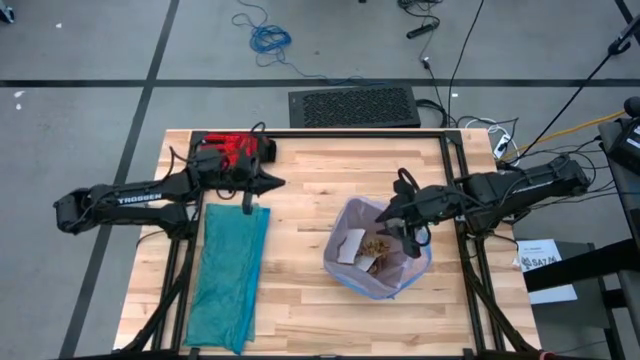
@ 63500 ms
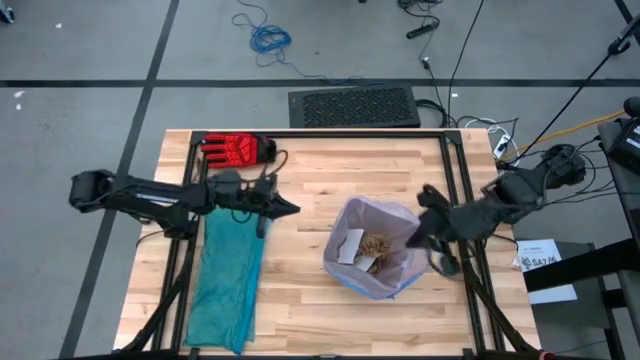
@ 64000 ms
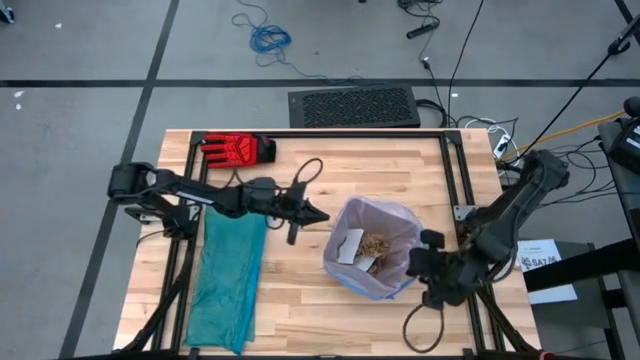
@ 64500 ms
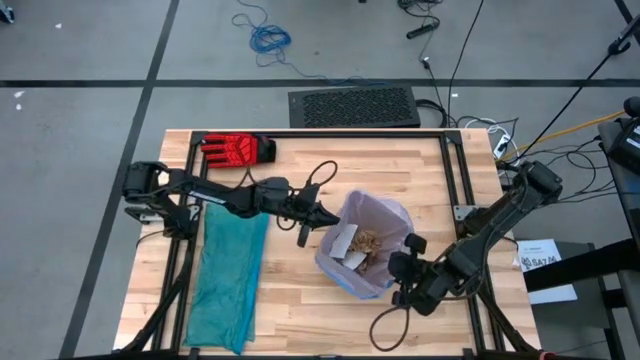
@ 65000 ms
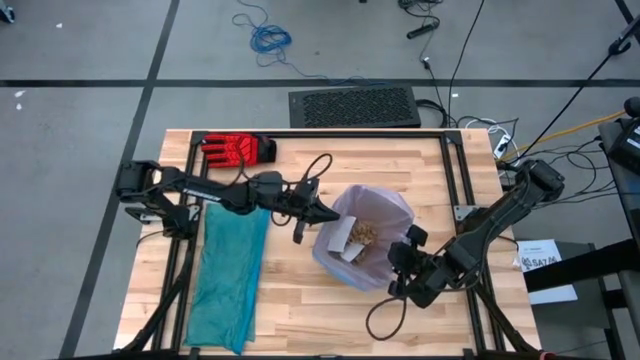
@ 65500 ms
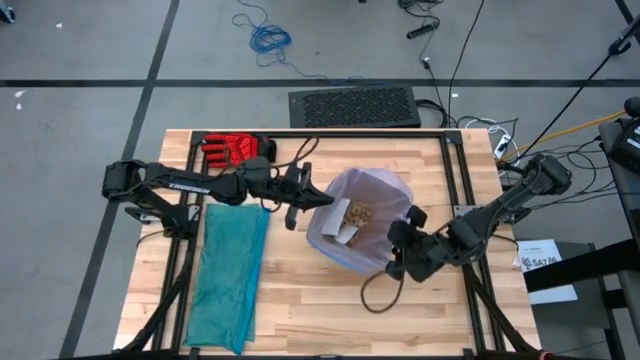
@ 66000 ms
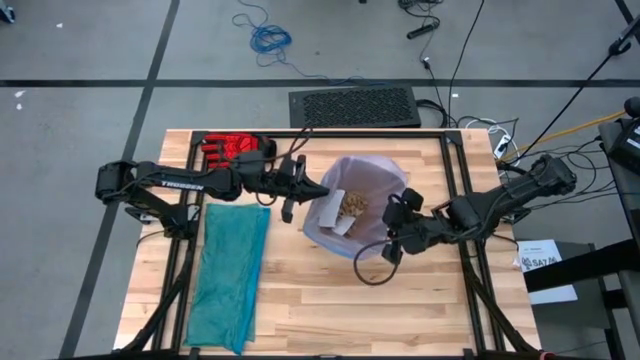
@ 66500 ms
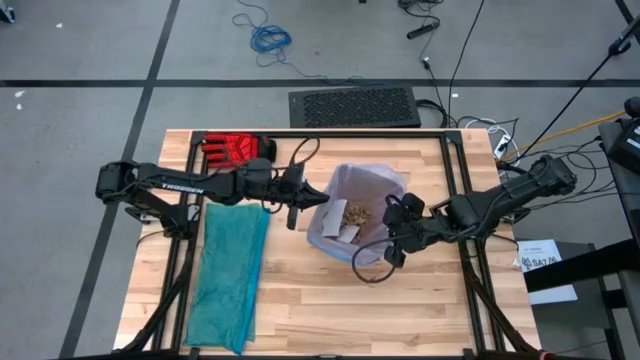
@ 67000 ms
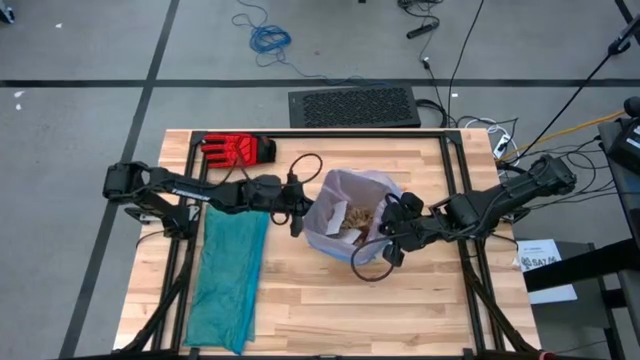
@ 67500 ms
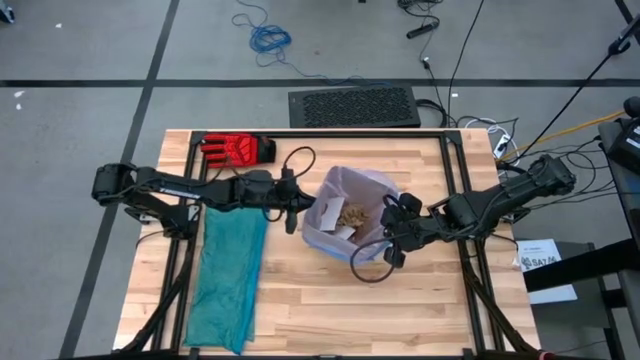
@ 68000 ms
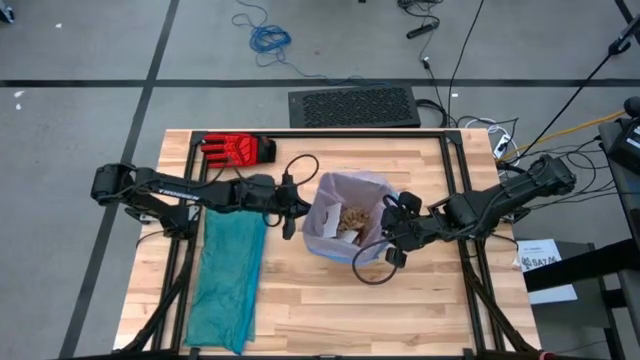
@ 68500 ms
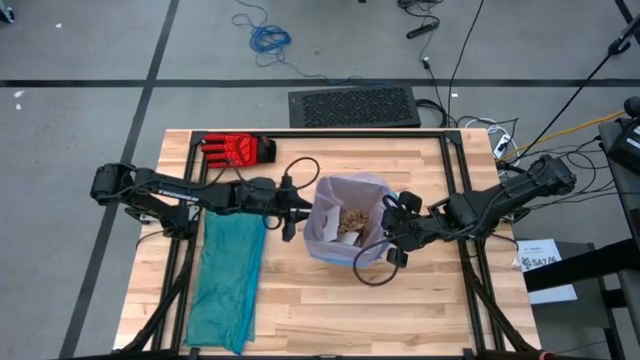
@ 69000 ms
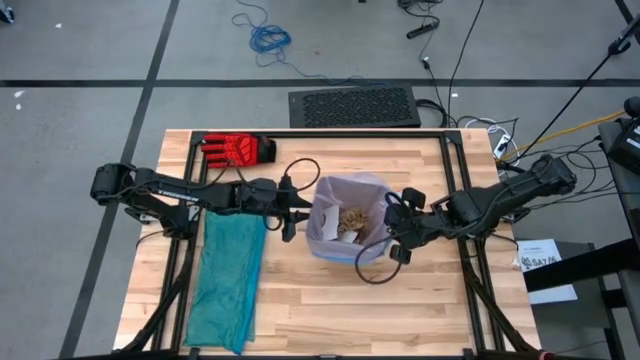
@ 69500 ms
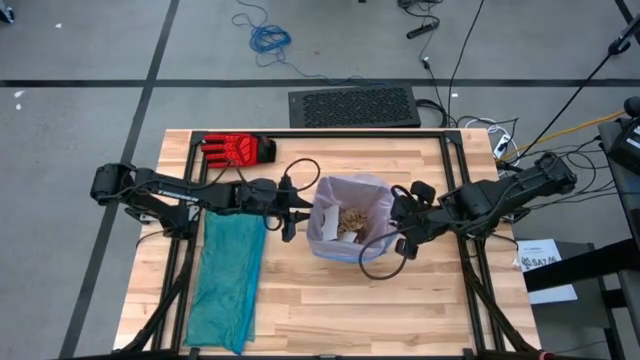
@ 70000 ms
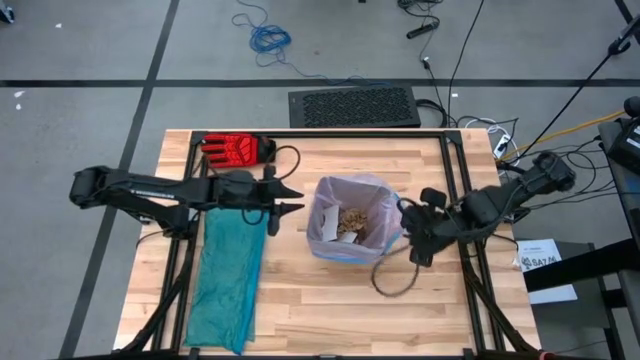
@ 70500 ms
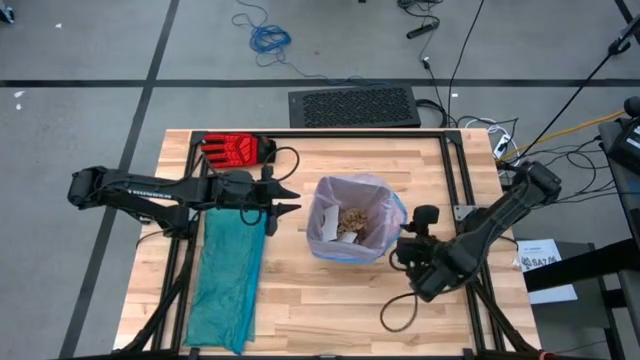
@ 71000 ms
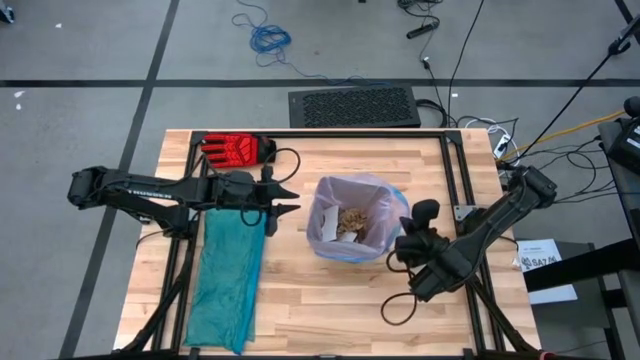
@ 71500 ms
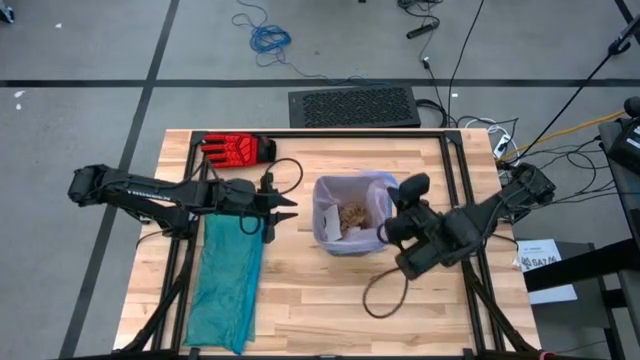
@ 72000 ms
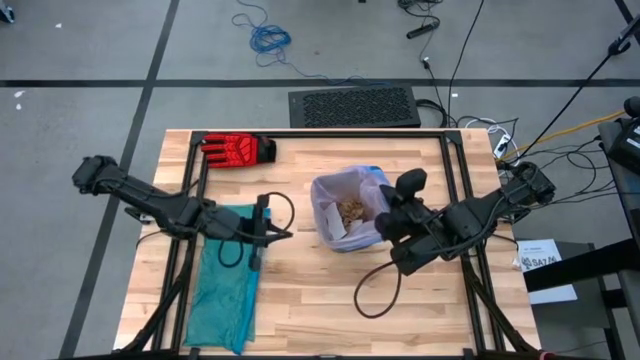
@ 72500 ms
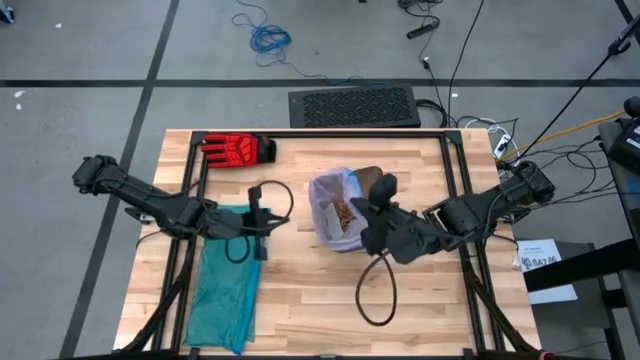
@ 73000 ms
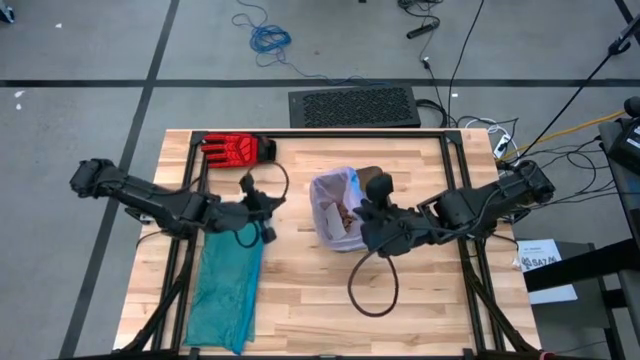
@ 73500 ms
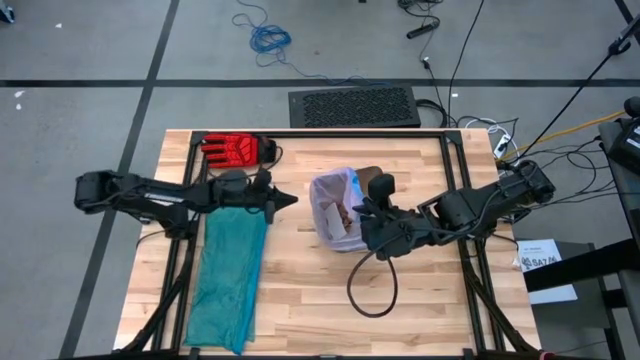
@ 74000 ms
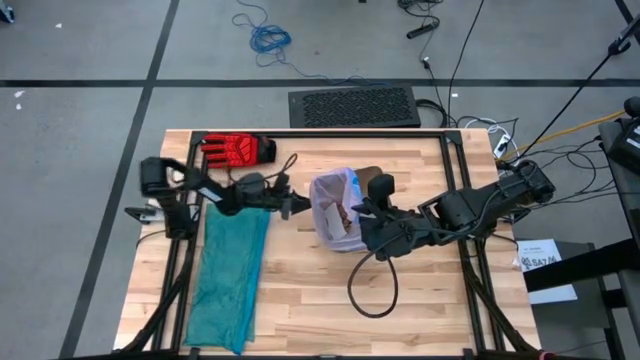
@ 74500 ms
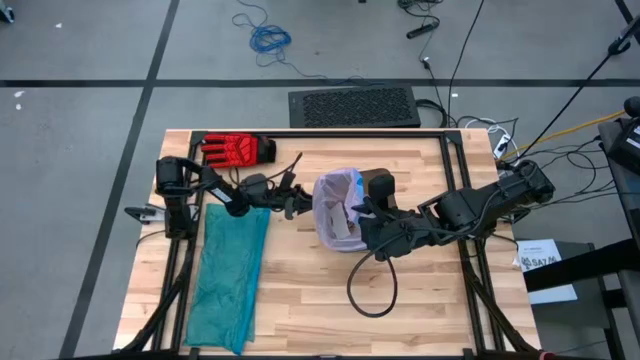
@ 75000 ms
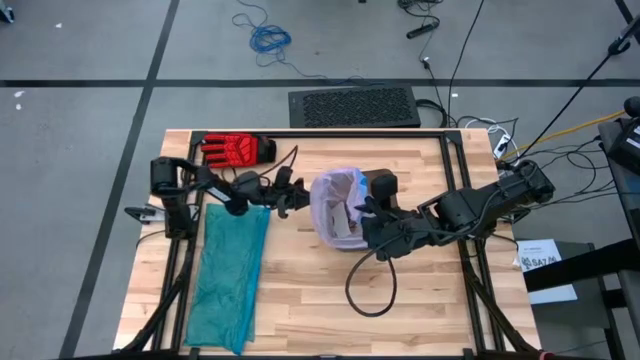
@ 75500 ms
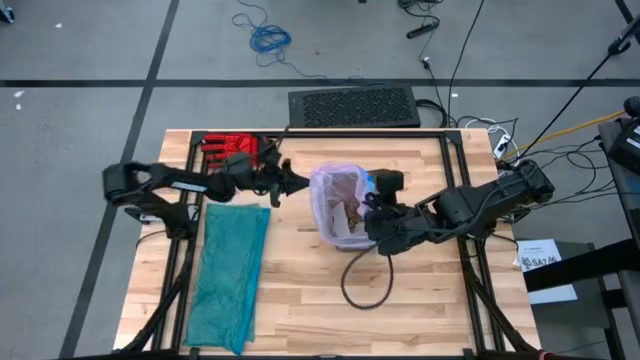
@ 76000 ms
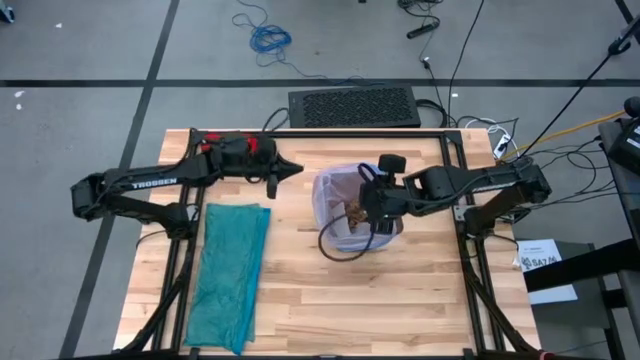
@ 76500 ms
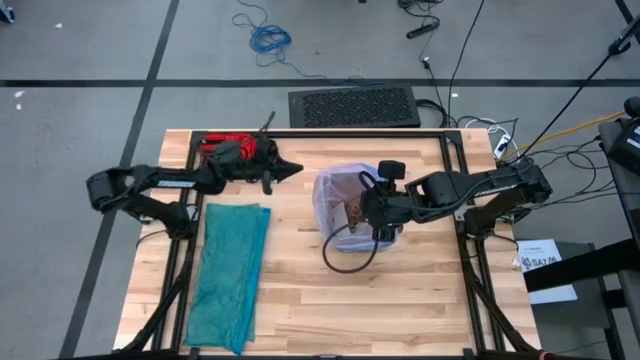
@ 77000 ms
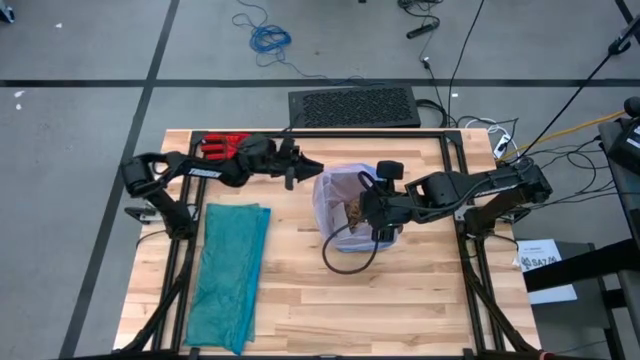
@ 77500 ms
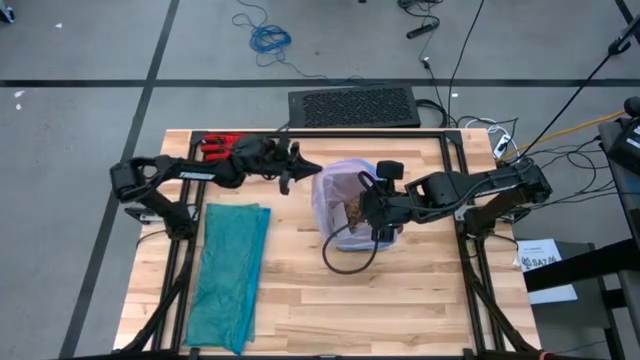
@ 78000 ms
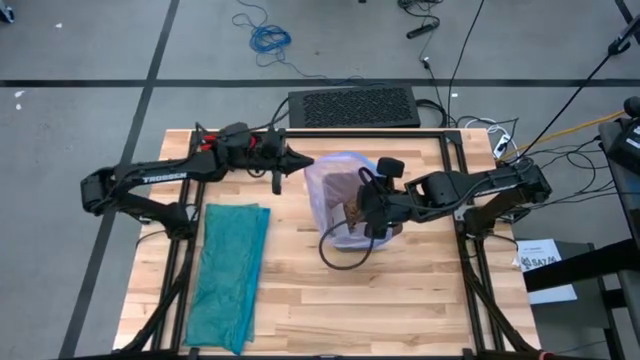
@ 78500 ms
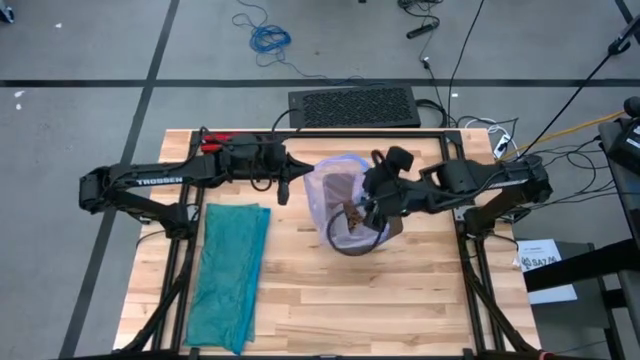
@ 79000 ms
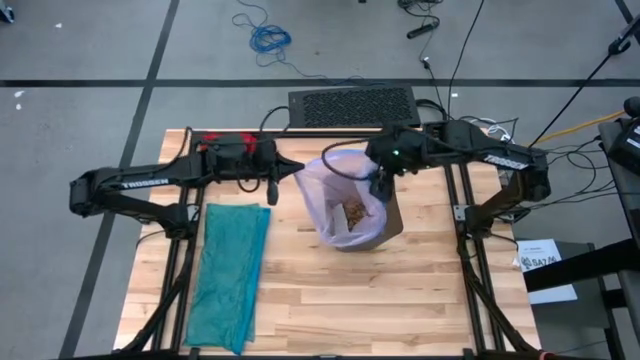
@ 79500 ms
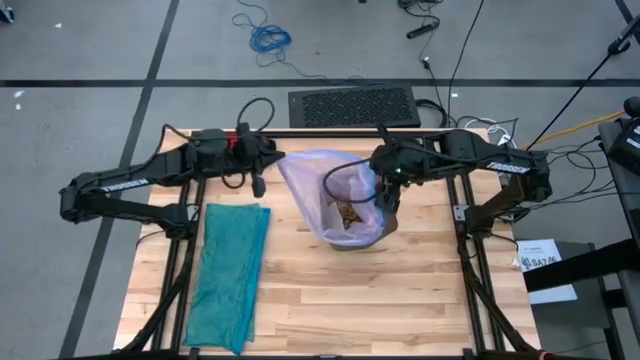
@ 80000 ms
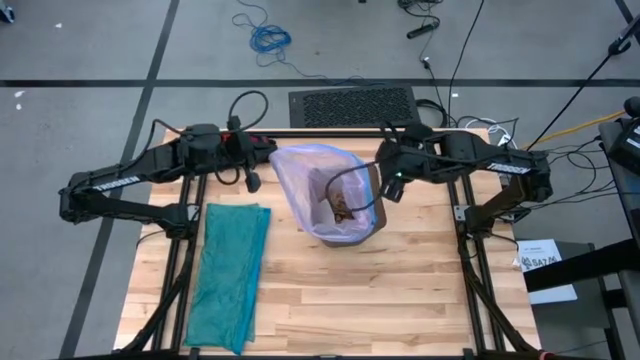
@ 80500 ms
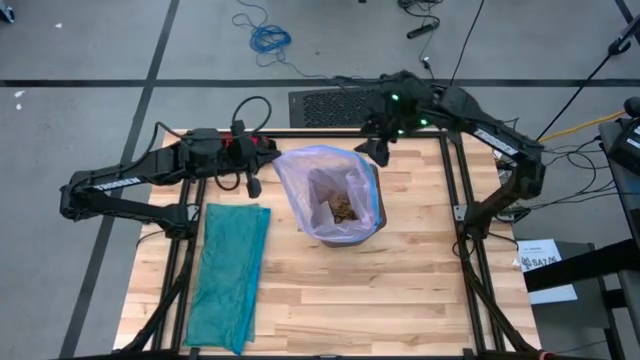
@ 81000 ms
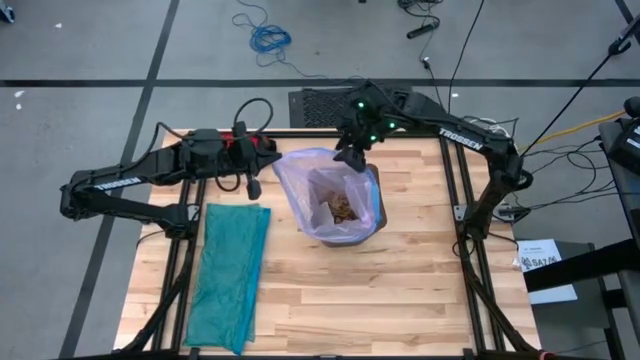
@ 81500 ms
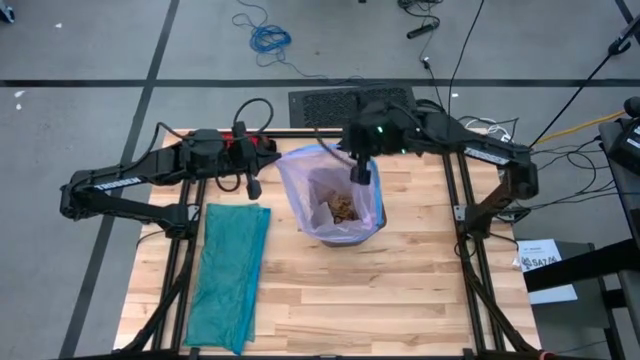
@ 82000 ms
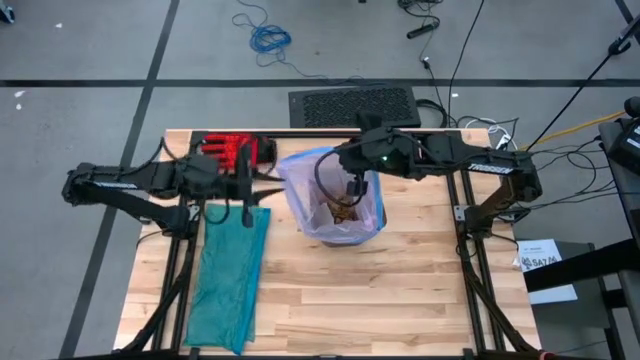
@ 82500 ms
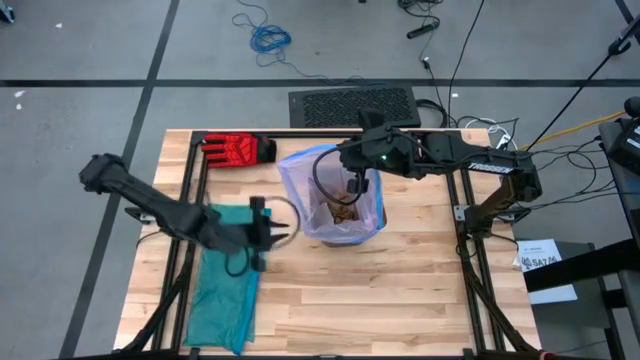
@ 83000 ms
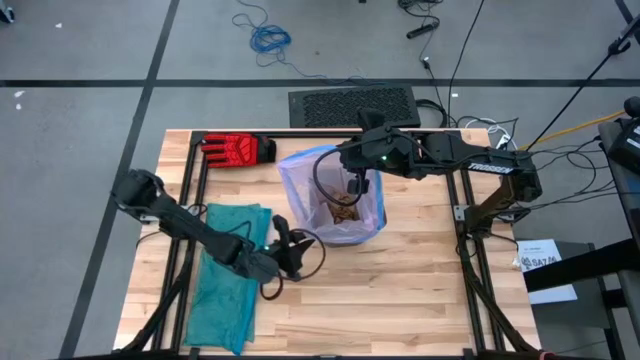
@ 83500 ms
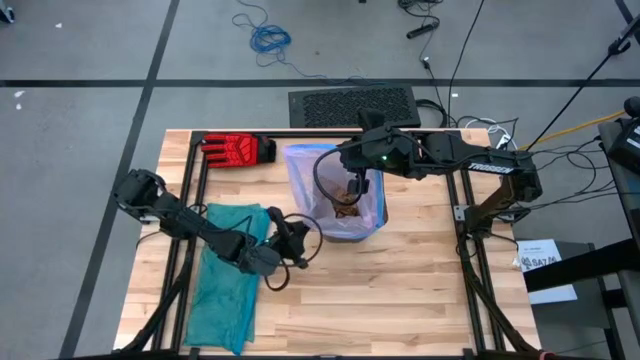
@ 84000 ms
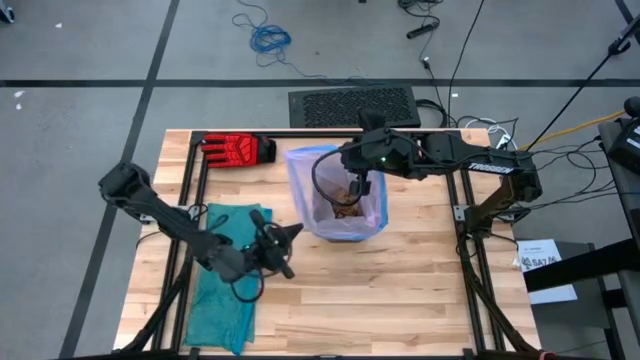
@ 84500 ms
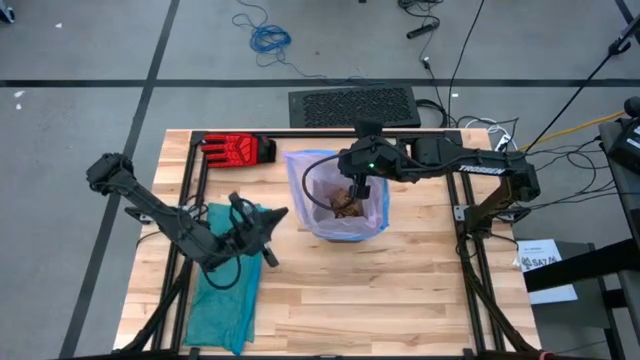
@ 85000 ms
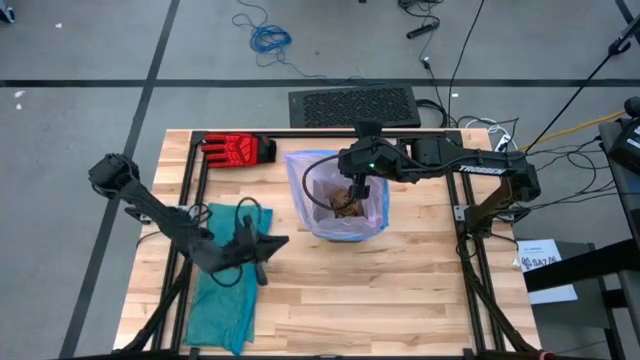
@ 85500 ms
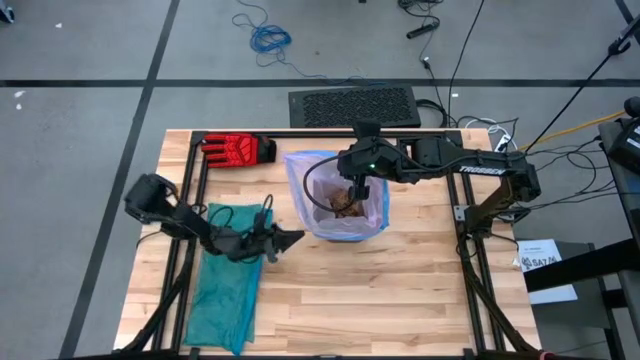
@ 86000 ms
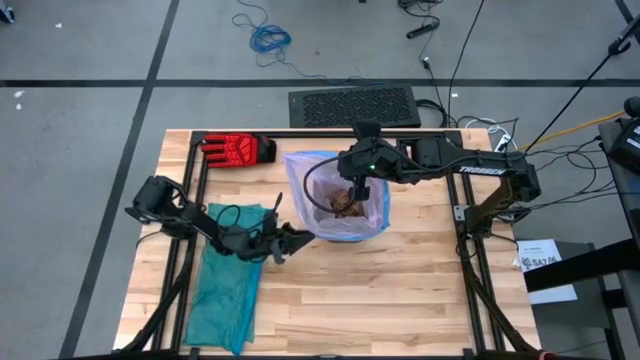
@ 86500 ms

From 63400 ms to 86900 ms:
Task: place trash/remove bag and relplace
Remove the pink trash bag from the black trash bin
